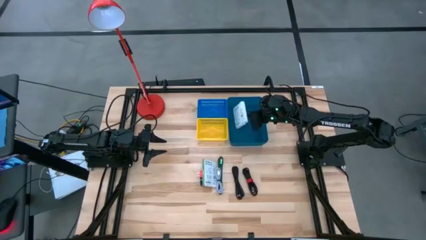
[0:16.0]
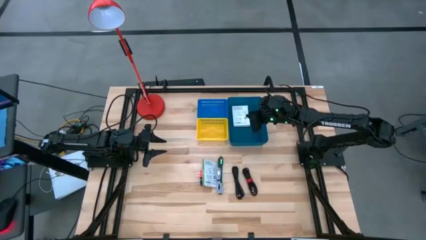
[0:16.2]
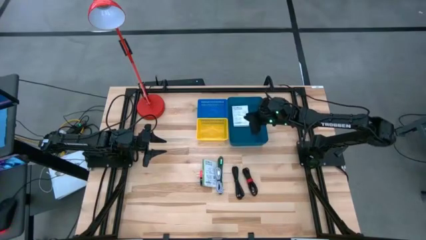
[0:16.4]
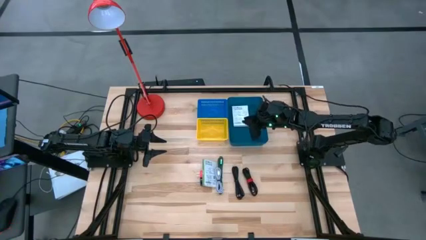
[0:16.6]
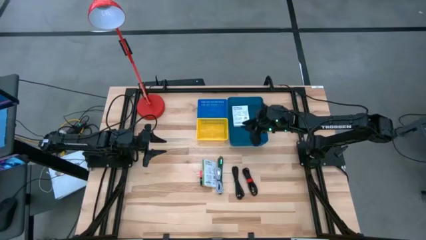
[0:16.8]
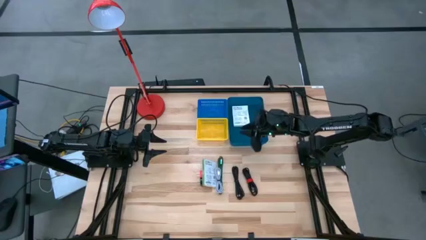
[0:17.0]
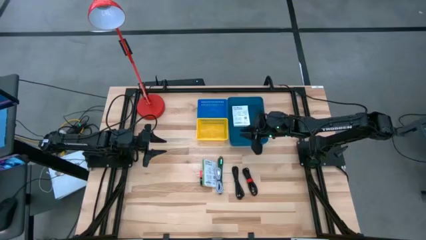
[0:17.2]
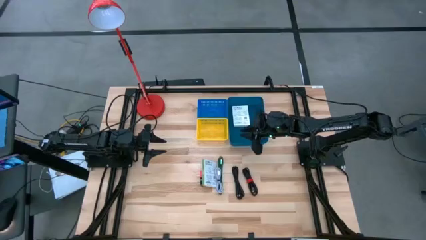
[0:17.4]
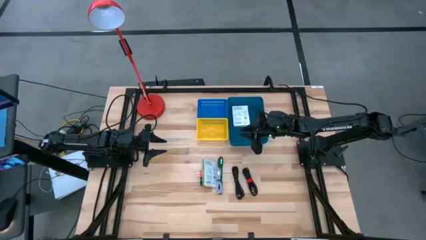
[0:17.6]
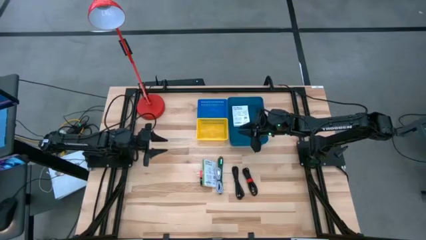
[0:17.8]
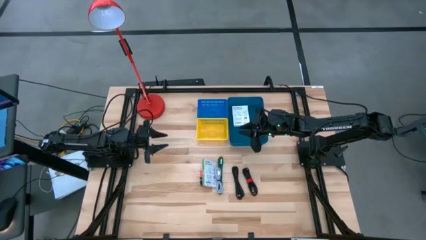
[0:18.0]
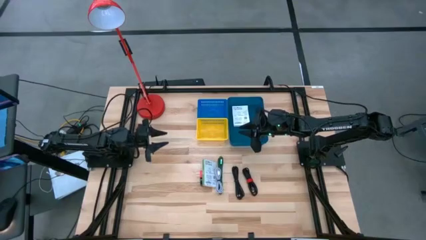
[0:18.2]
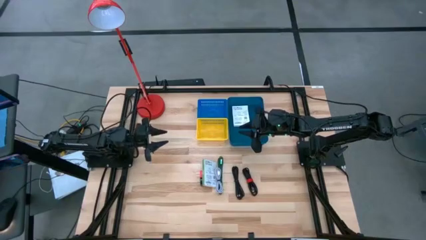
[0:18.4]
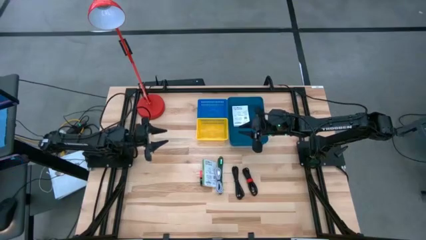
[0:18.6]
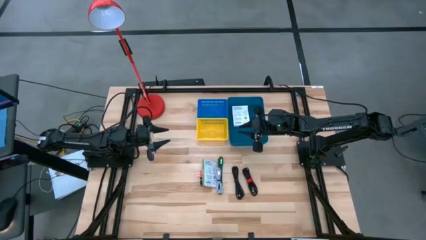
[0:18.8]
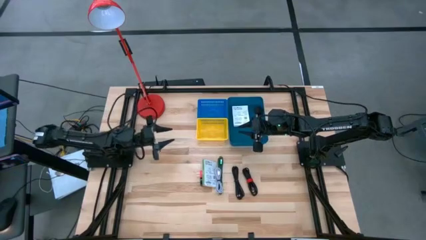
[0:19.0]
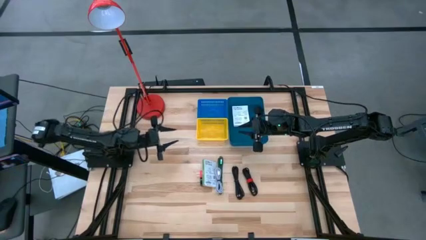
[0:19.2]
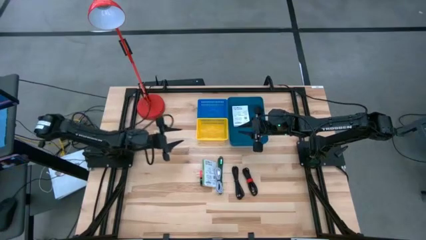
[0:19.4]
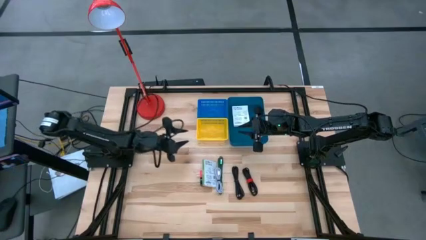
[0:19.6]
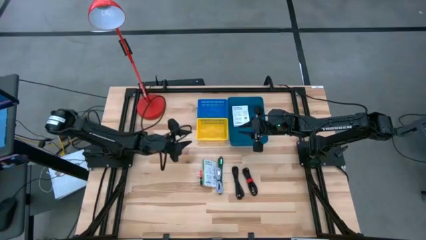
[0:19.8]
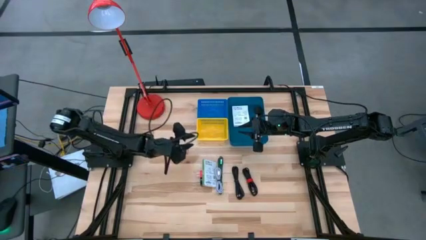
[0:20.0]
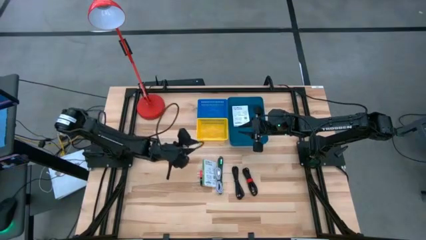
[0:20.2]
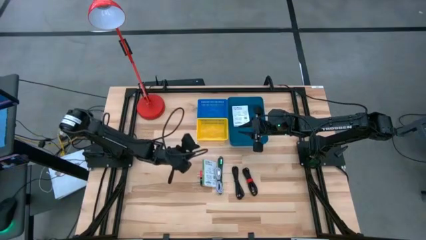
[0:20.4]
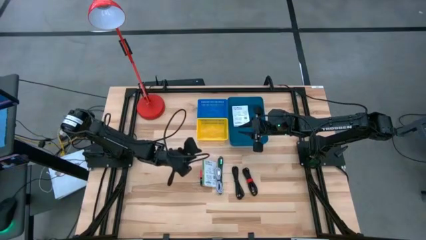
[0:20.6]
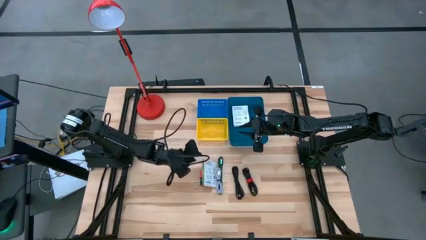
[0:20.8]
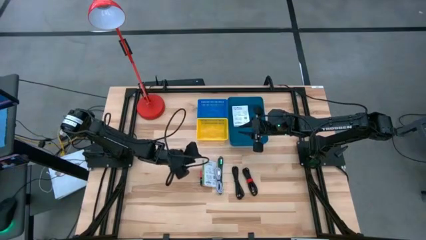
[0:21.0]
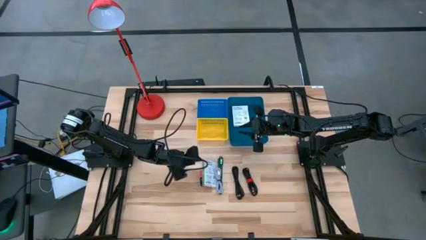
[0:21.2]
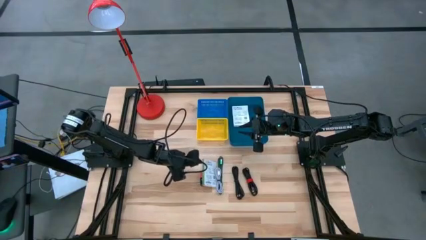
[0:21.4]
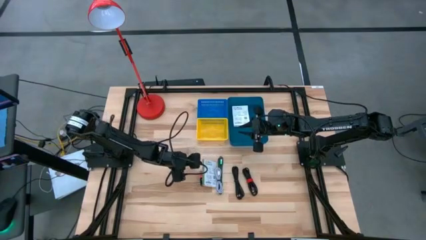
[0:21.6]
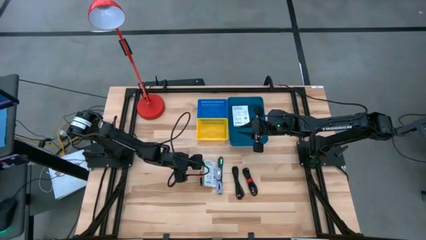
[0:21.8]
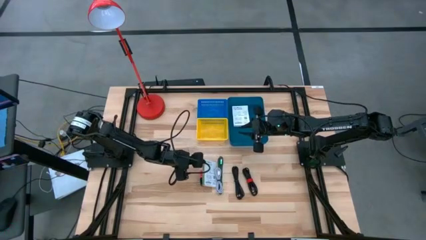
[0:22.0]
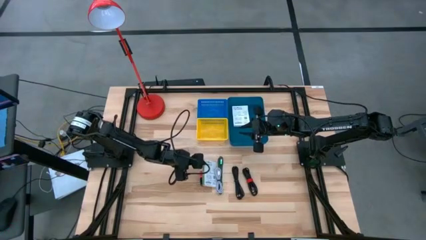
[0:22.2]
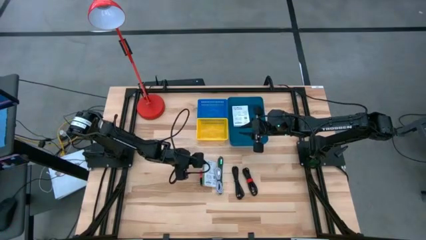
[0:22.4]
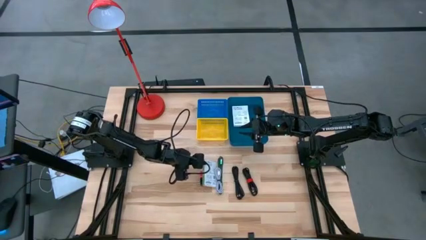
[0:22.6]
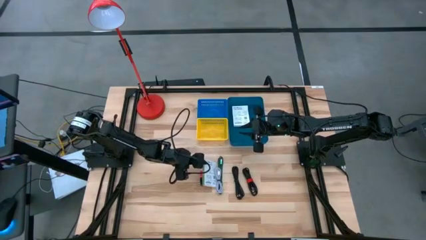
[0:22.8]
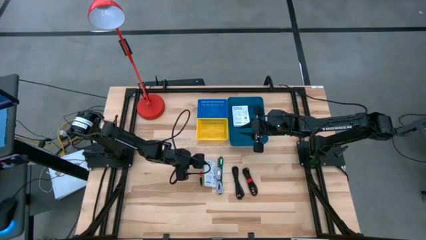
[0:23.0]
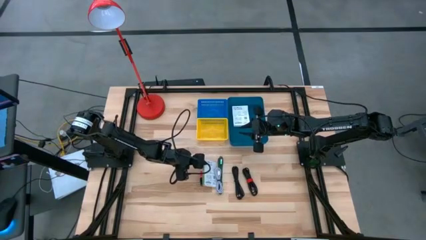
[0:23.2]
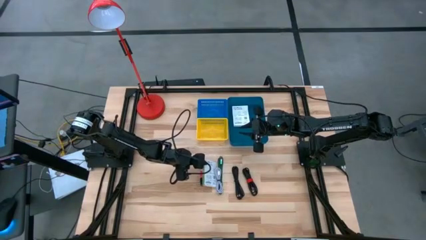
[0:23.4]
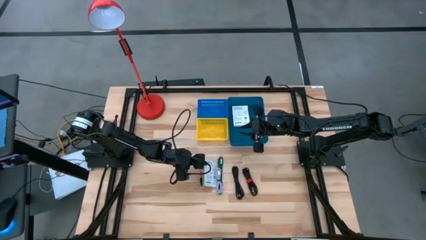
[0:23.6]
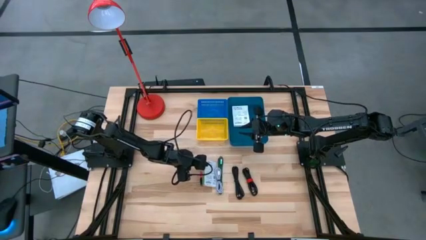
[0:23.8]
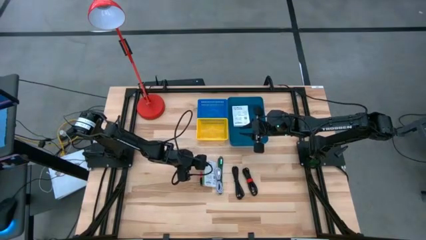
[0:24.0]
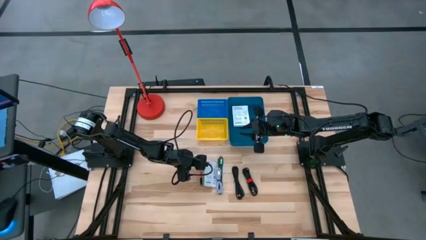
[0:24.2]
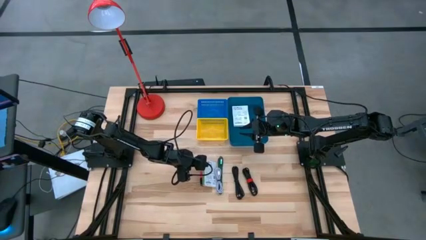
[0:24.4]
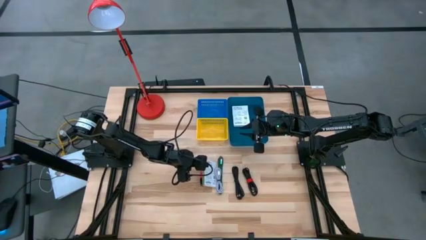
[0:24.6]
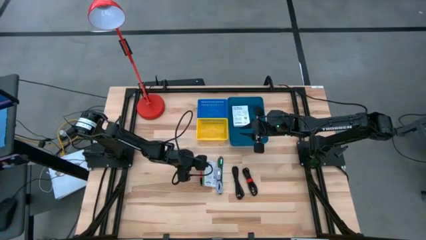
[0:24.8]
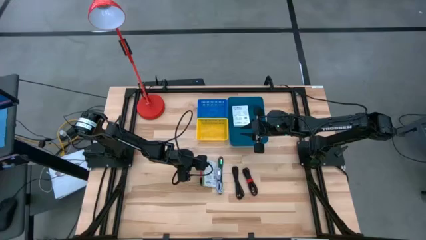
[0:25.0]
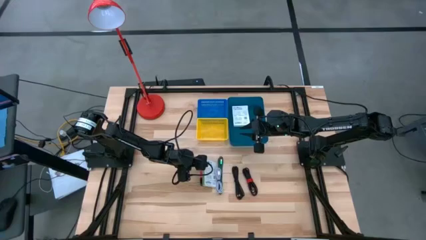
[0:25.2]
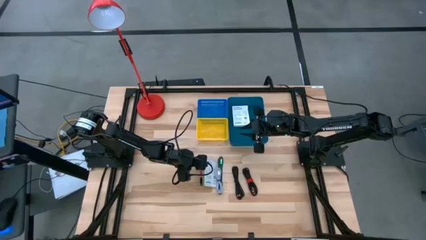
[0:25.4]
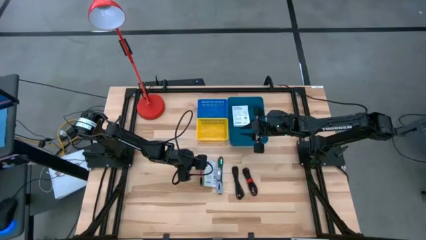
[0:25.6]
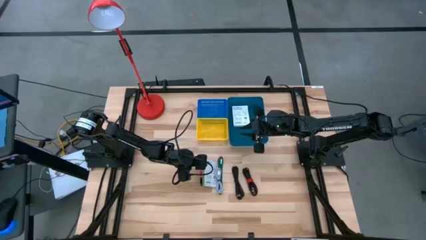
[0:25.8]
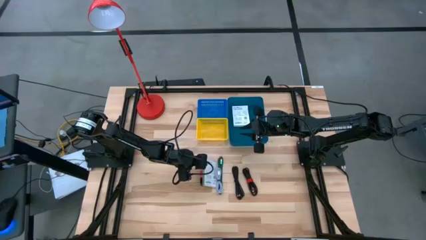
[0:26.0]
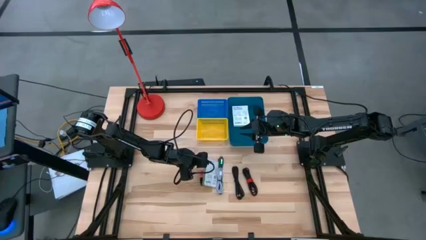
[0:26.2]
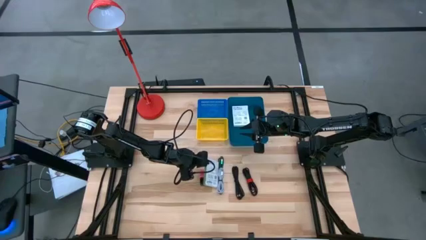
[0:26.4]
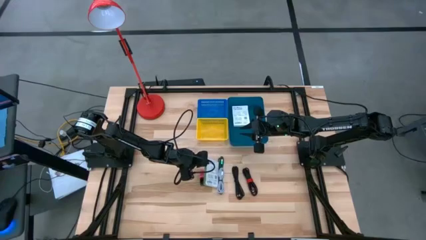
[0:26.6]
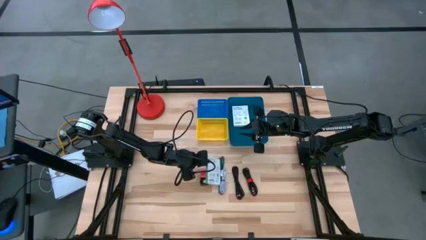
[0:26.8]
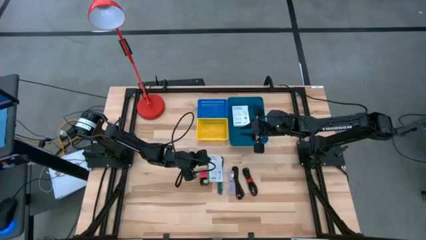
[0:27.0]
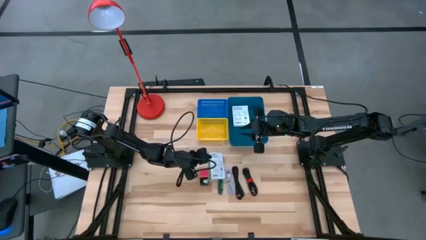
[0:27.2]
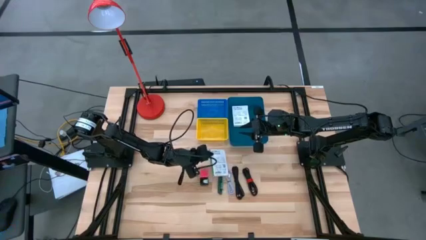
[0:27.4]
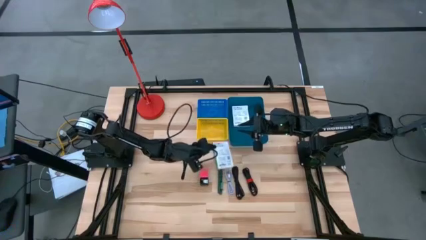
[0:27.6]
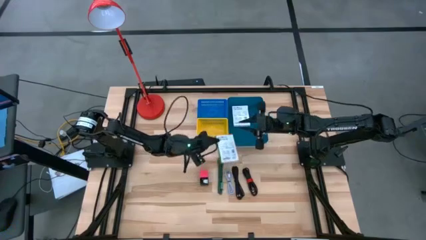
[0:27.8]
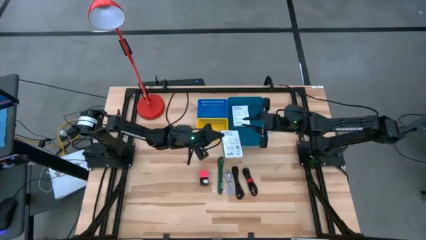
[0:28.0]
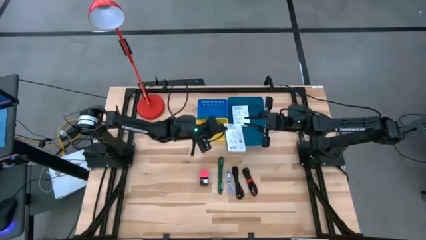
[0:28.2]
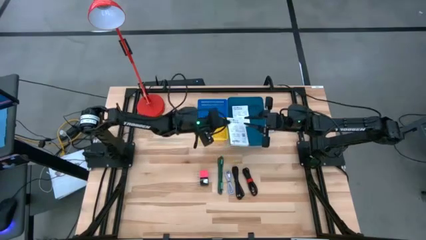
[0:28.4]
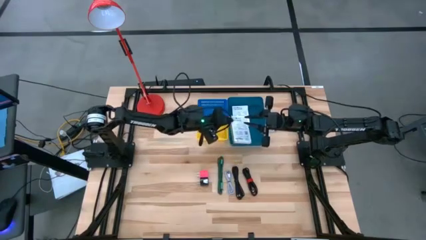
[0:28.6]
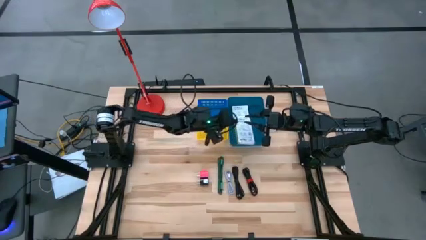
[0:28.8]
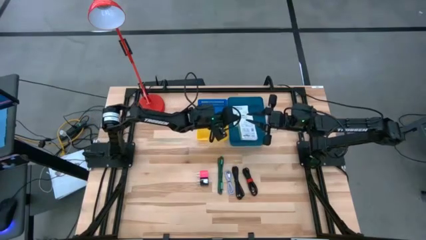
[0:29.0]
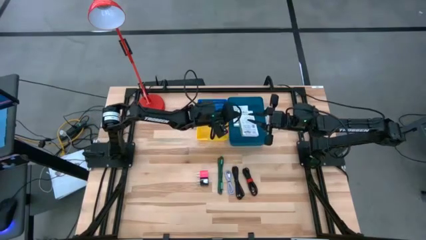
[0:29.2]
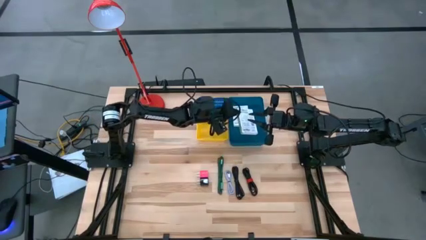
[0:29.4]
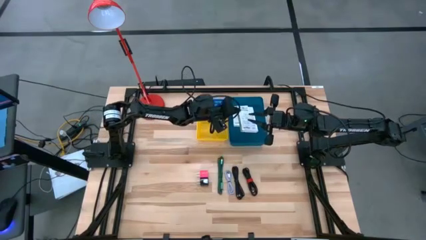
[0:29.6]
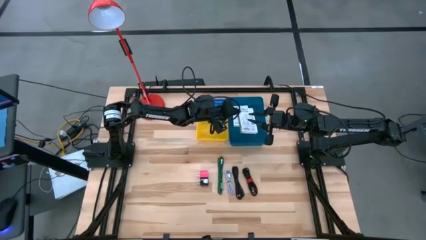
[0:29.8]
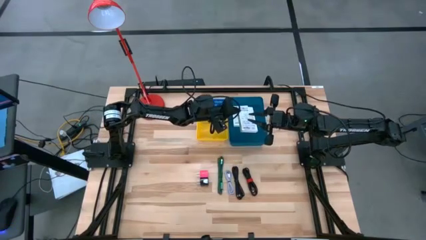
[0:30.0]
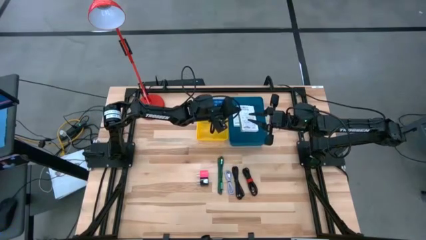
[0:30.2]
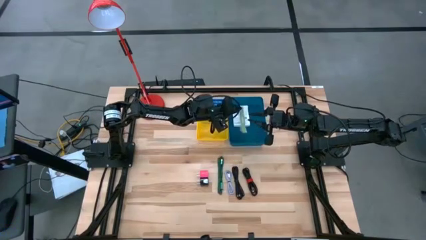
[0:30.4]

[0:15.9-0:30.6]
Task: Pick and place items into bin
Put the cardreader box into the dark blue bin
